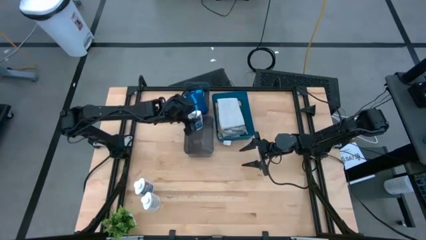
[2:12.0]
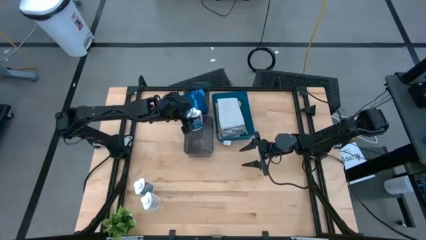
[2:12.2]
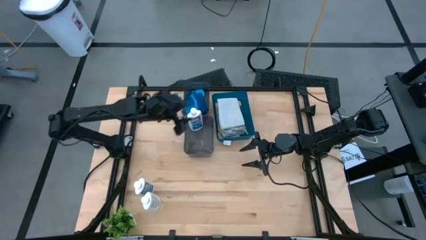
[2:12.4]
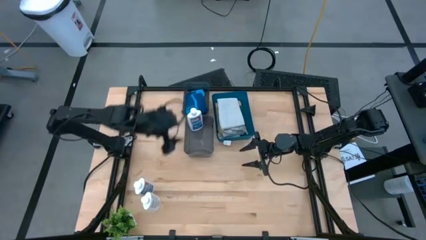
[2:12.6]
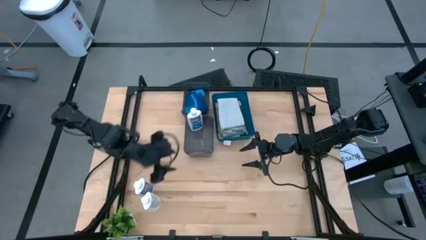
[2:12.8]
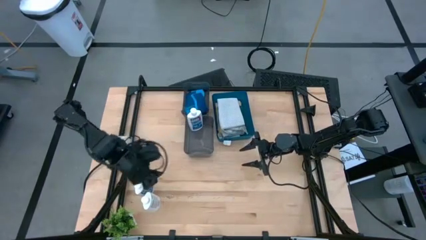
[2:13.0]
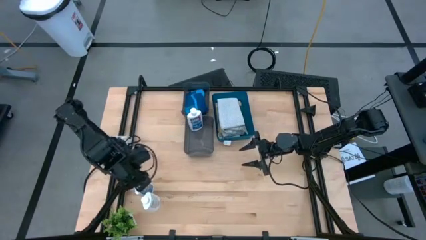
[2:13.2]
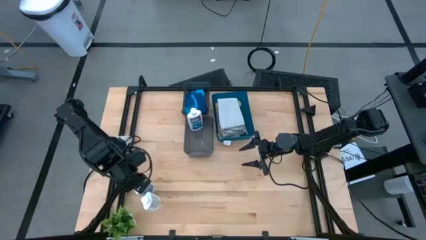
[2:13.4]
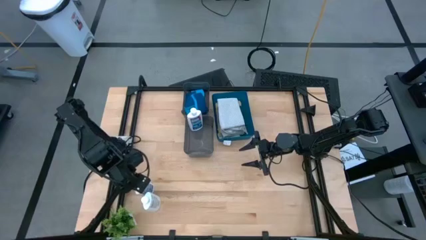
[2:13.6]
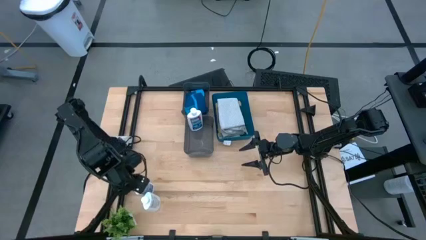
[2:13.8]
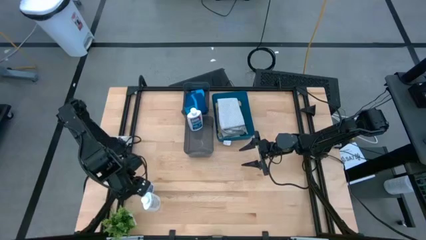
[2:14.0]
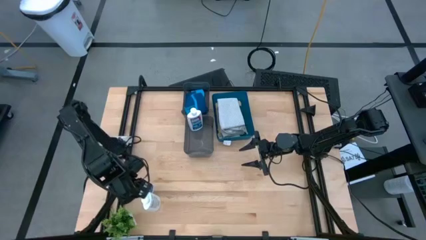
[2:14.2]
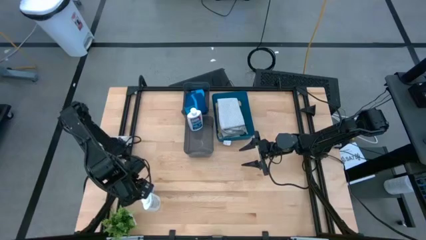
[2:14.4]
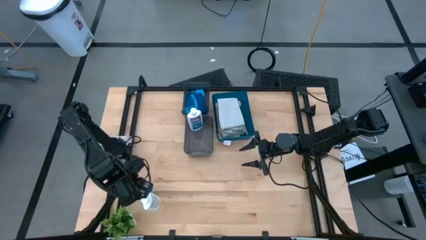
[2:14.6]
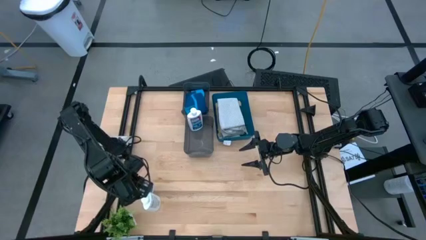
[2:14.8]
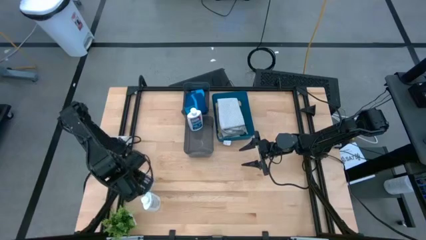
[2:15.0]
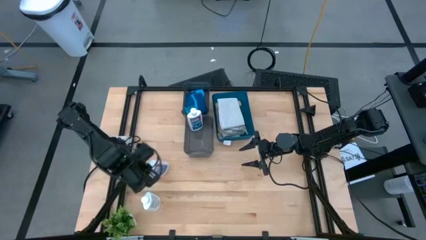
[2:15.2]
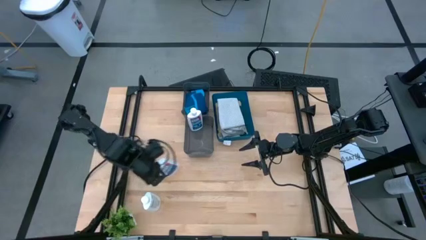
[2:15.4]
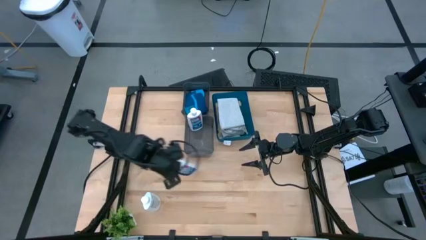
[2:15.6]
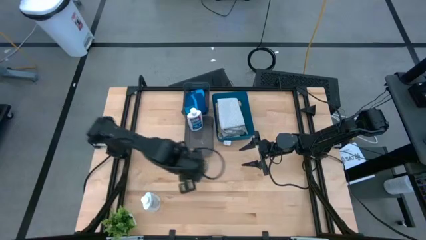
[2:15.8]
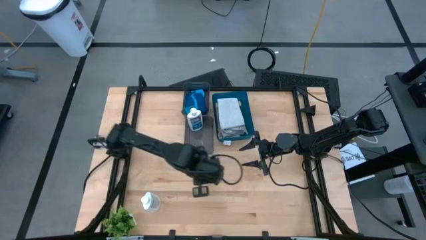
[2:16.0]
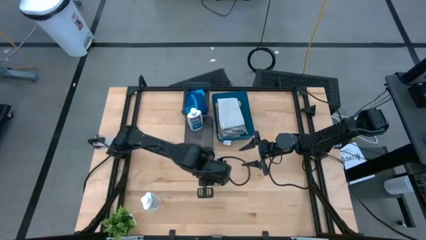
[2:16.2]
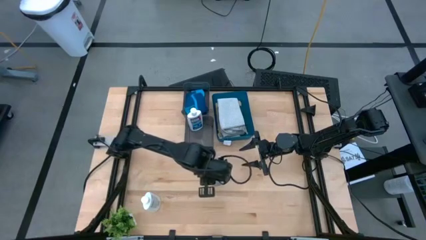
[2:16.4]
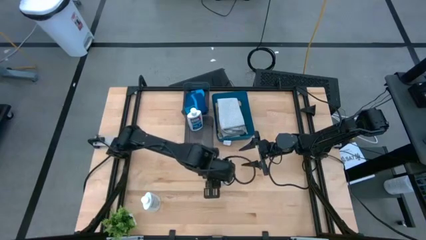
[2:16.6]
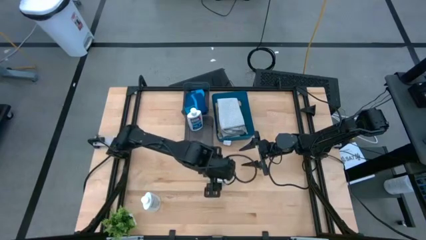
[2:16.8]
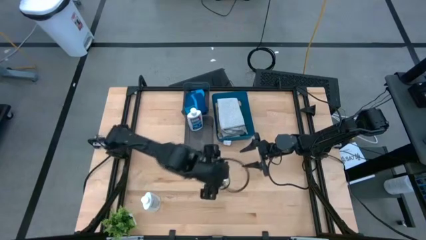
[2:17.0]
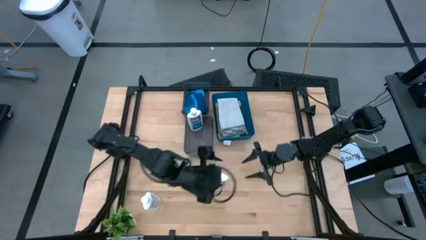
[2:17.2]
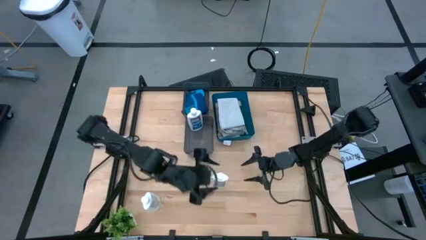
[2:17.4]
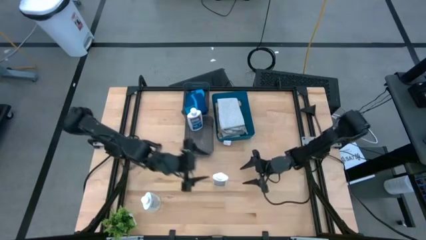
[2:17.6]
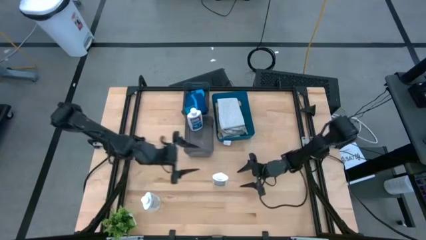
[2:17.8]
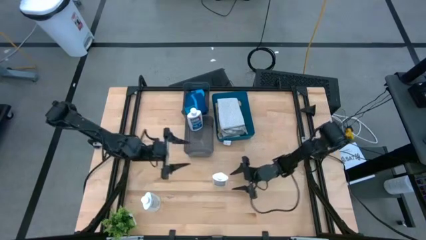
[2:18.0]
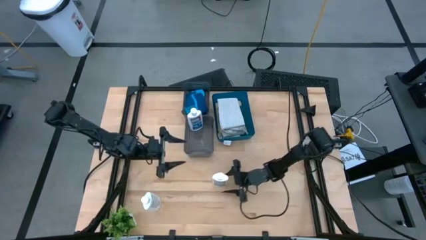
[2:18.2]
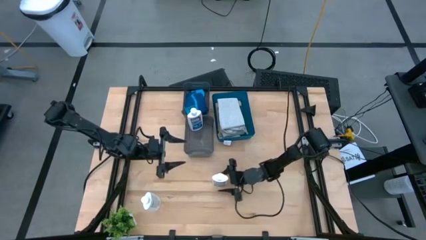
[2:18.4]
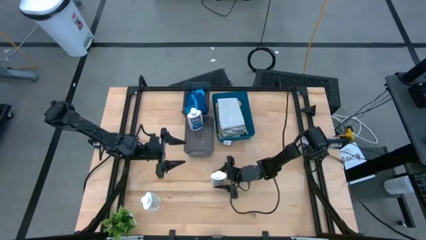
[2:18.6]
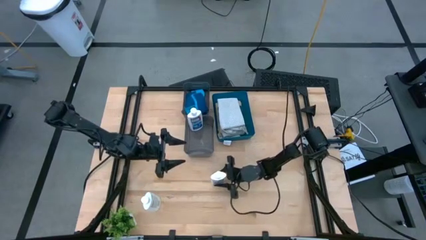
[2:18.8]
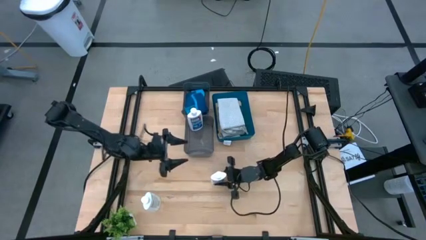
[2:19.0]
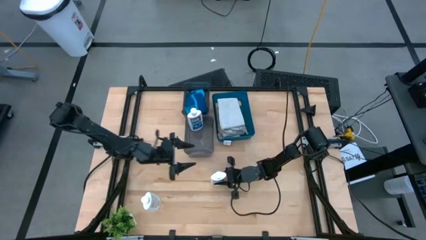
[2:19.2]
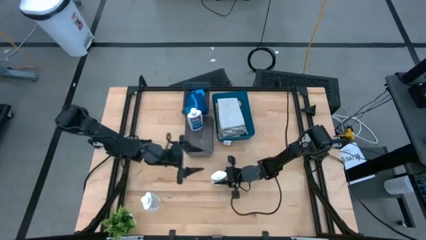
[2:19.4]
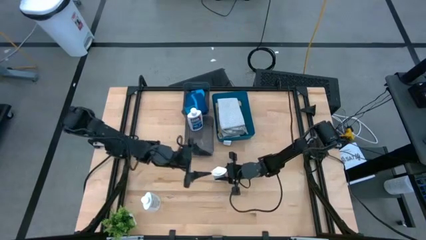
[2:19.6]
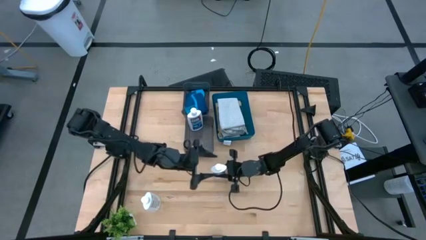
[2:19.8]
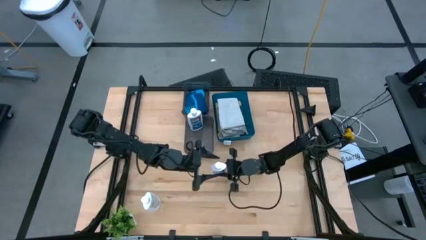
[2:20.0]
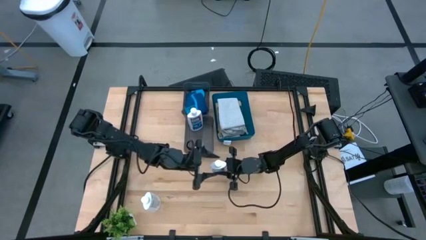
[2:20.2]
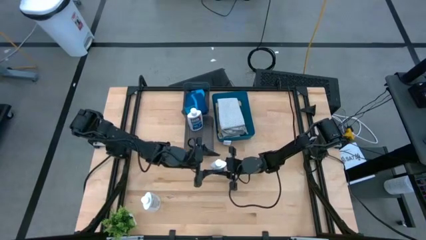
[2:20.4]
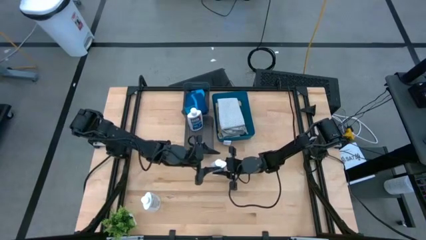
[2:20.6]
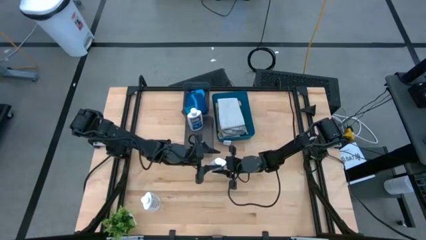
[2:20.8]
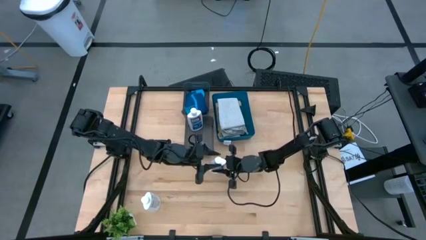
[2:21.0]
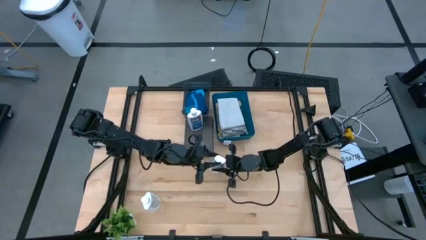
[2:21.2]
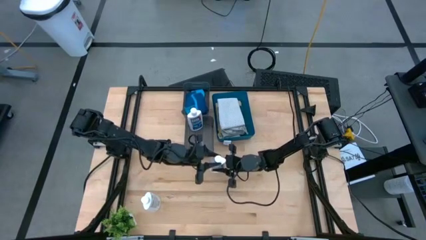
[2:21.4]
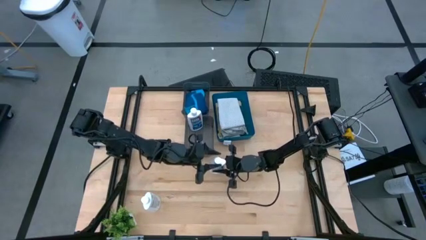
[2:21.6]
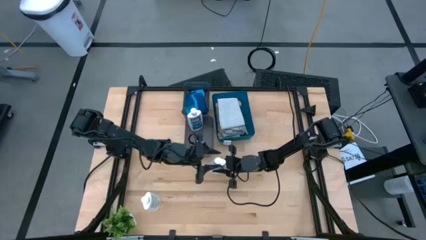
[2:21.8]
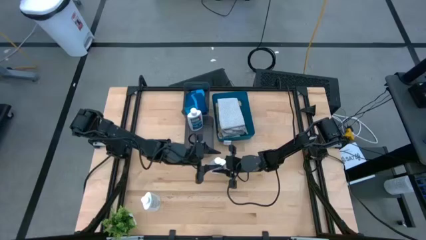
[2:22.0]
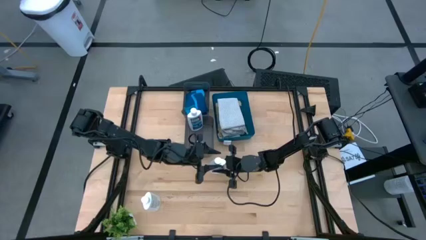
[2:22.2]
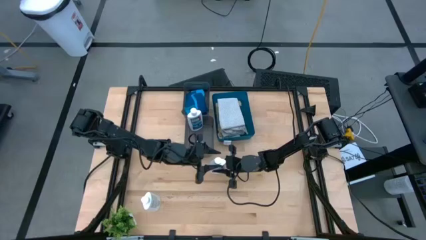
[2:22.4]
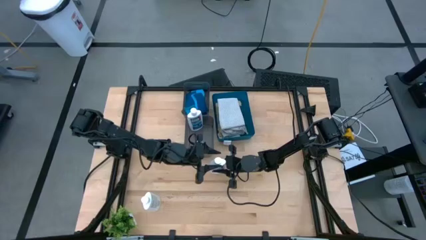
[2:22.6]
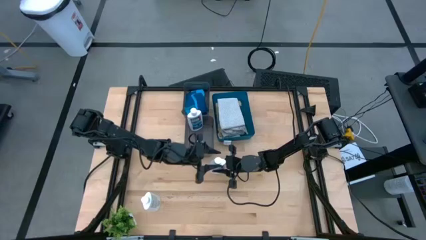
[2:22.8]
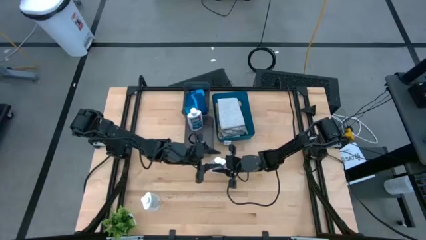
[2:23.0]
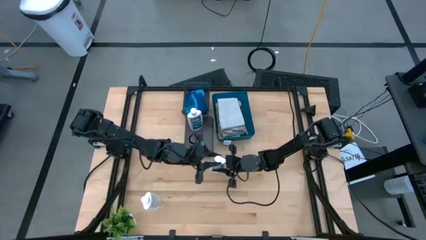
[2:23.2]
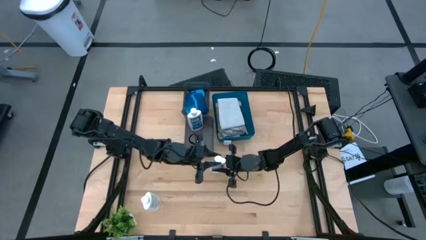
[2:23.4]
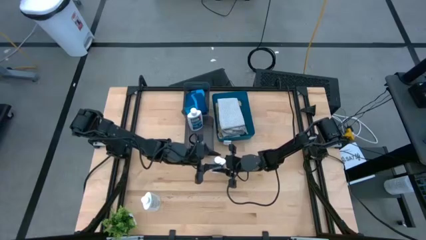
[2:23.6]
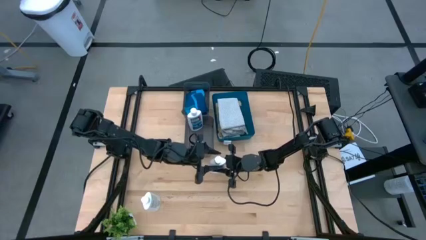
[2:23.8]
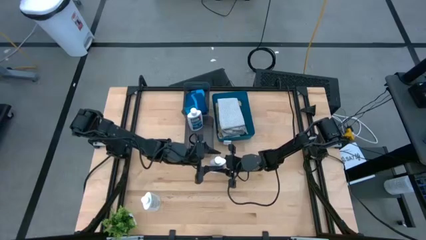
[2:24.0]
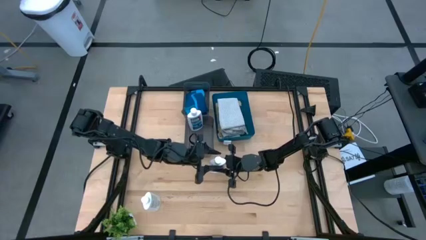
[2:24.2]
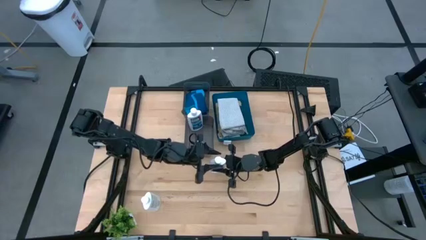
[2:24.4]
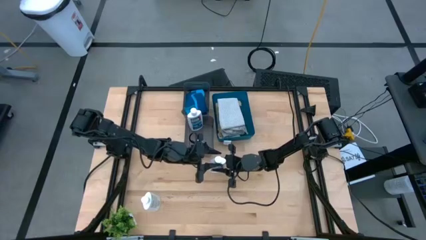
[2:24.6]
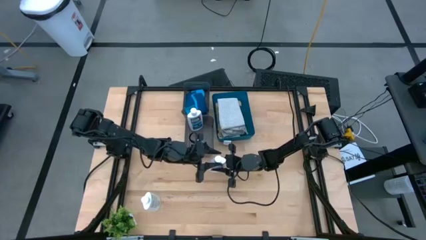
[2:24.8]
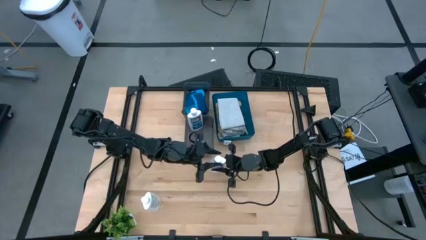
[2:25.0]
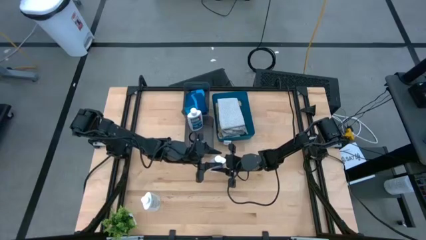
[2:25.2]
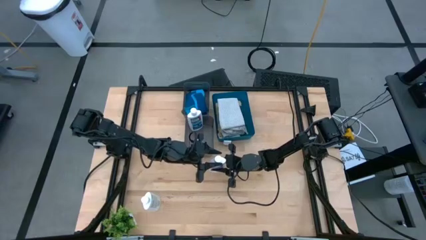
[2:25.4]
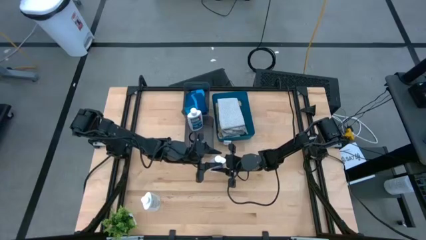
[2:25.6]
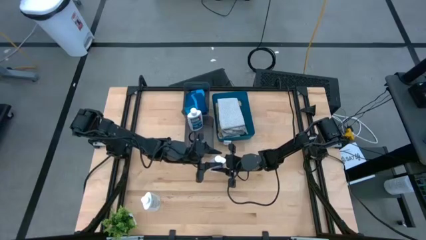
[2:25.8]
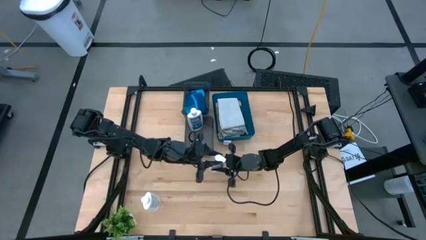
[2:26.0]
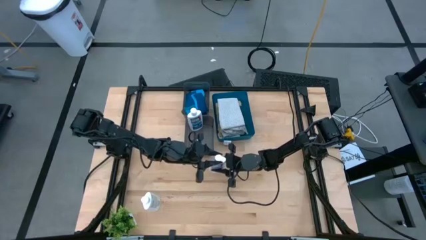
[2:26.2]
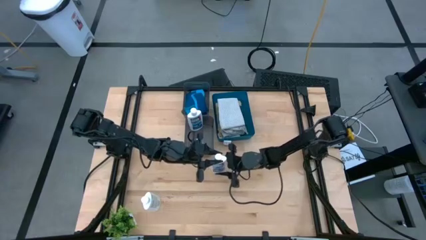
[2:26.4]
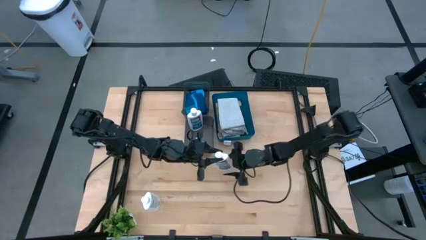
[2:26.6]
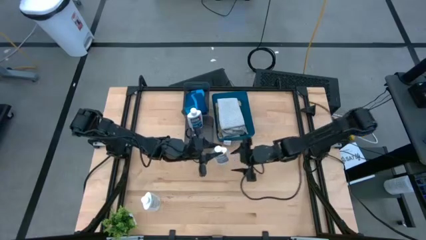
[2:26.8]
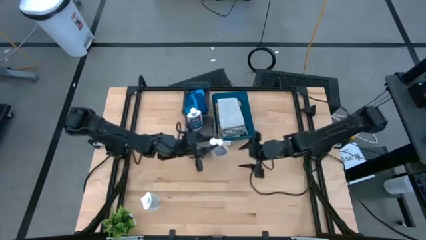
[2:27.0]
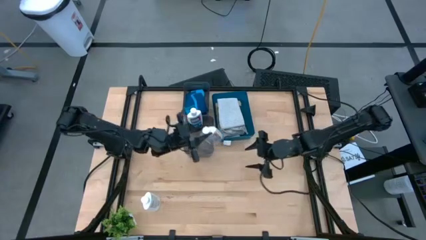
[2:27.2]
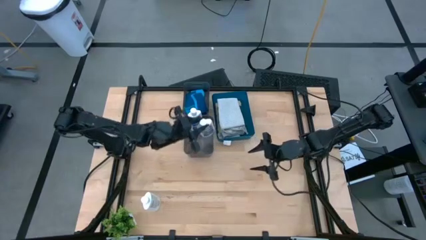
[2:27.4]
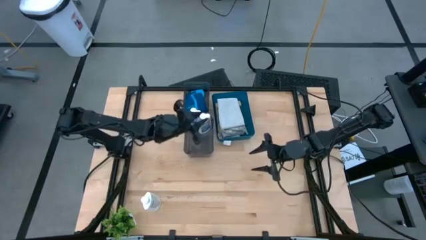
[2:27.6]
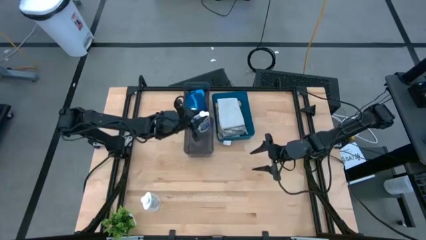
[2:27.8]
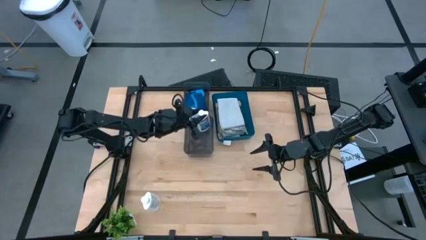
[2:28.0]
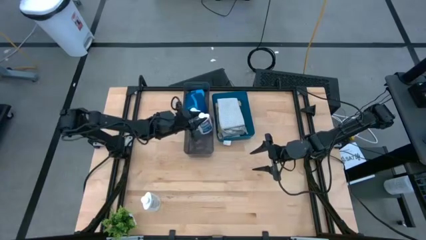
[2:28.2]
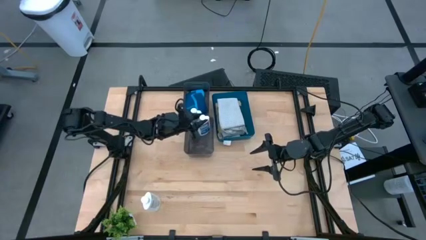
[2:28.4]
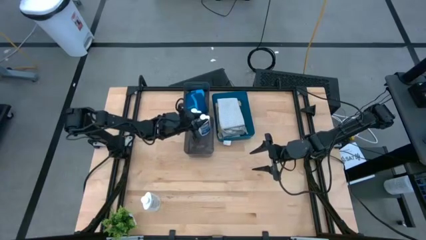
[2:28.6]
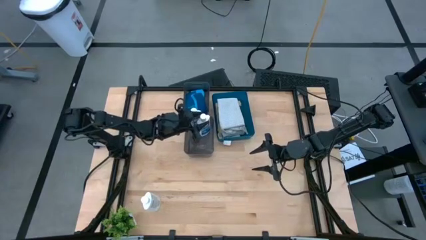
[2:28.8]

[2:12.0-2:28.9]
Task: Pick & Place Kitchen Items
Put the top white plastic restorer bottle into the bottom black bin

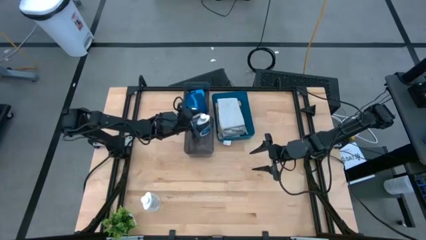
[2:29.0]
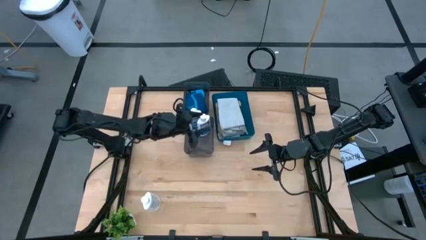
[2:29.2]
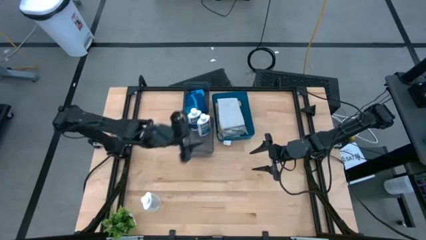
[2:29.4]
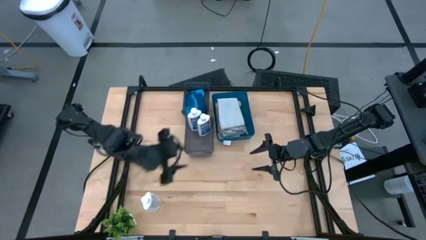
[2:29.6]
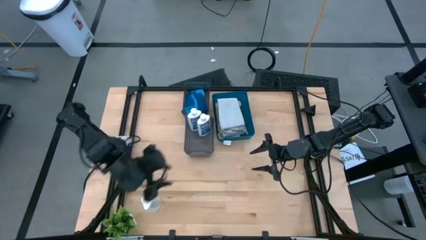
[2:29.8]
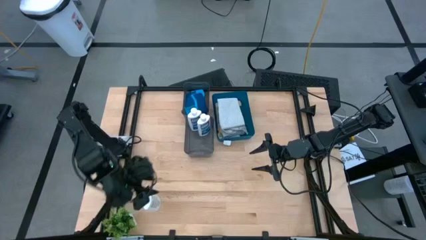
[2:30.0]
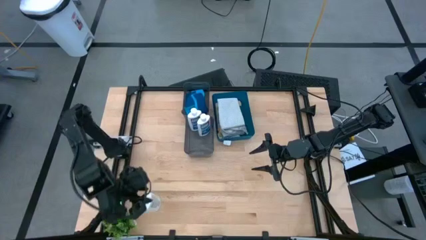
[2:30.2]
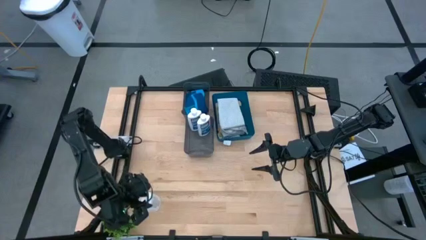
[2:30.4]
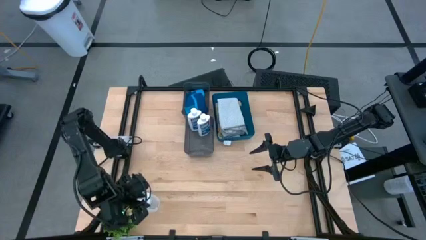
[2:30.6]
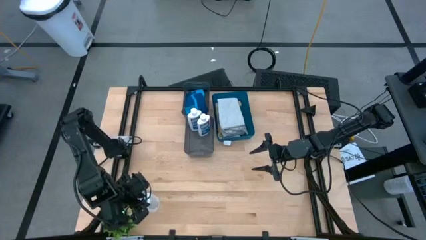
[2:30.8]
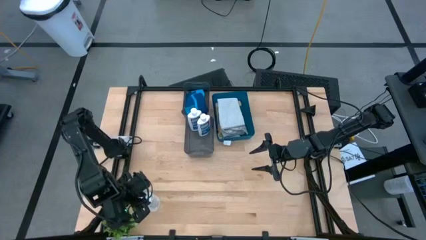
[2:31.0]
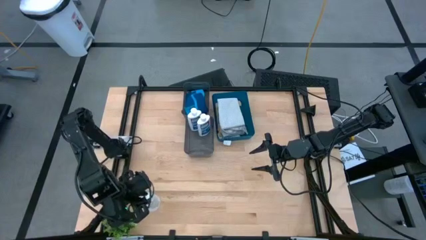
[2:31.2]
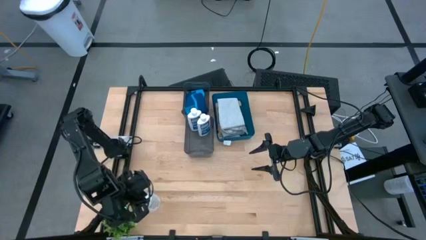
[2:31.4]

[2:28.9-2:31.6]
Put the white plastic restorer bottle into the bottom black bin
